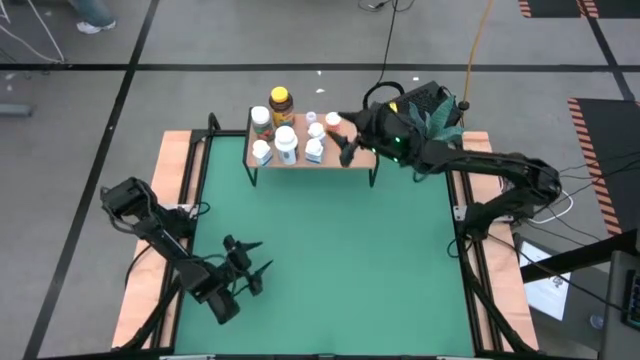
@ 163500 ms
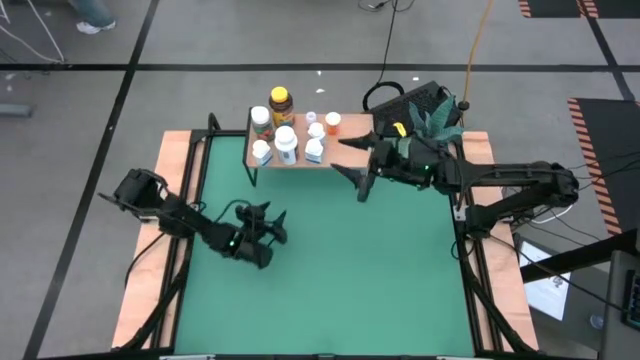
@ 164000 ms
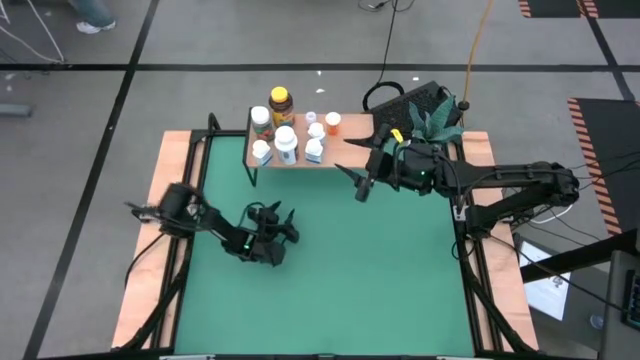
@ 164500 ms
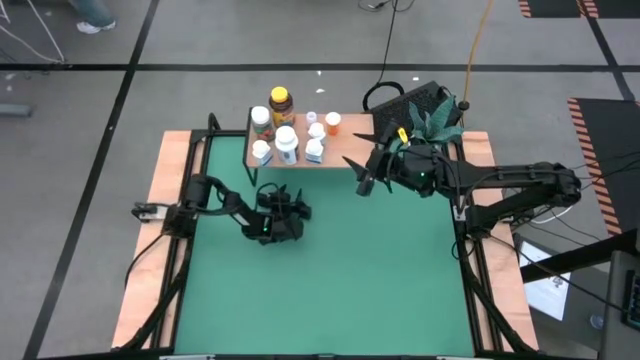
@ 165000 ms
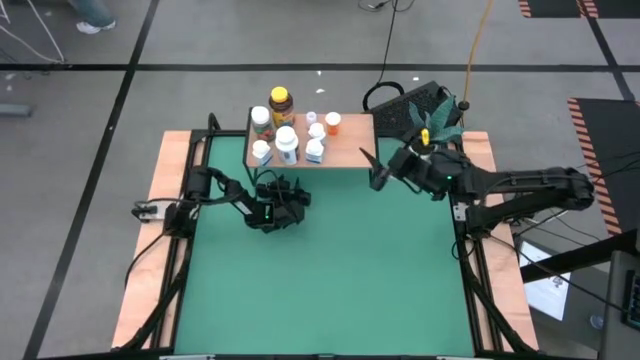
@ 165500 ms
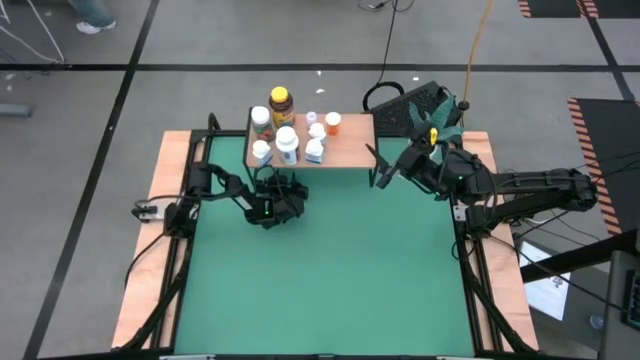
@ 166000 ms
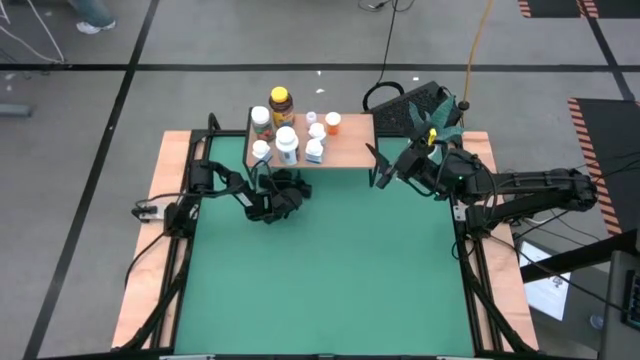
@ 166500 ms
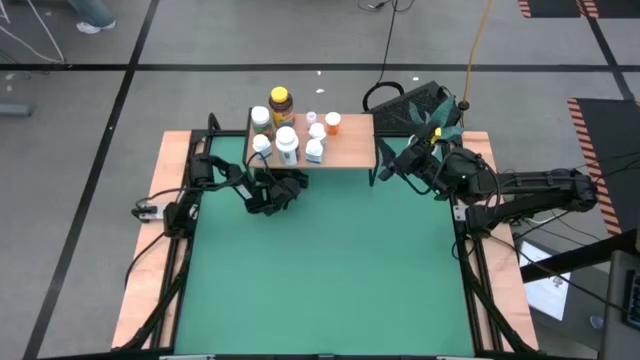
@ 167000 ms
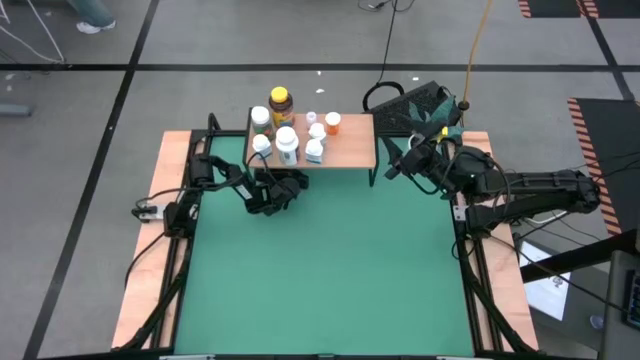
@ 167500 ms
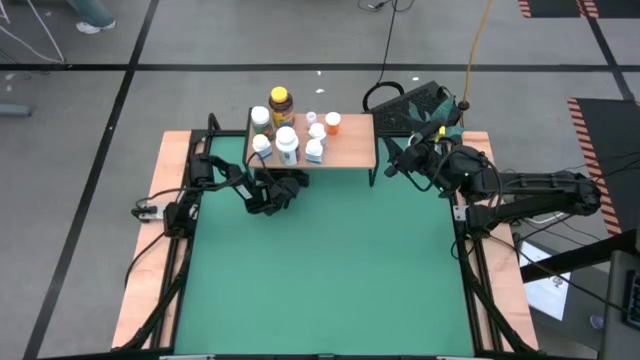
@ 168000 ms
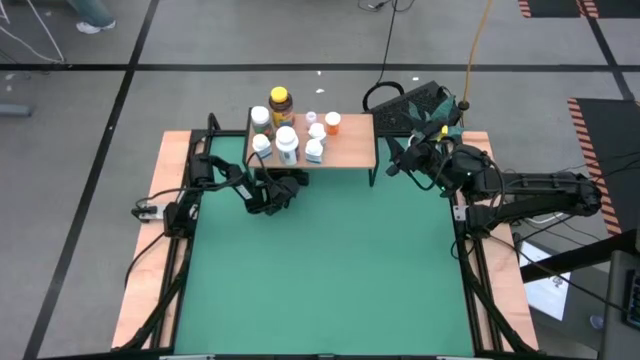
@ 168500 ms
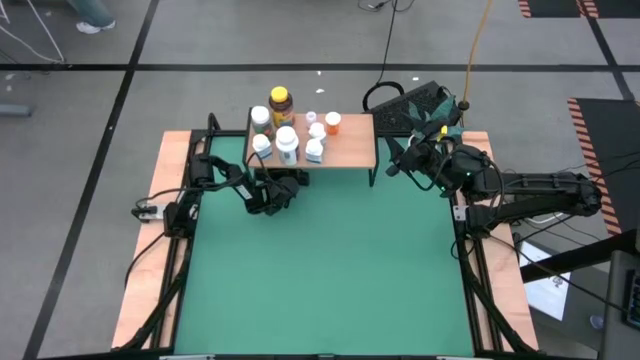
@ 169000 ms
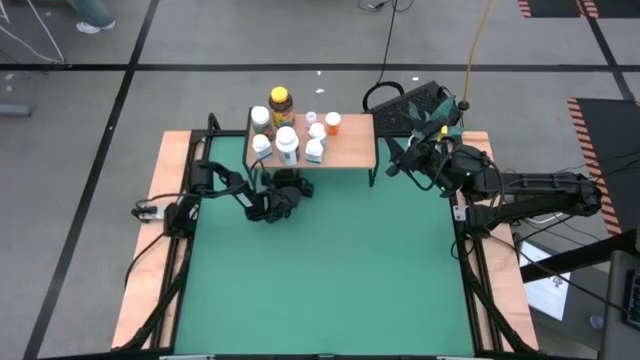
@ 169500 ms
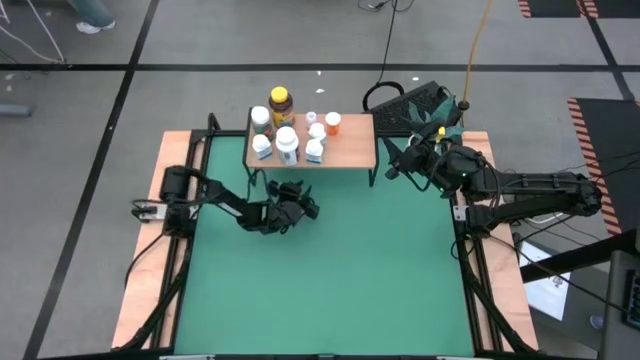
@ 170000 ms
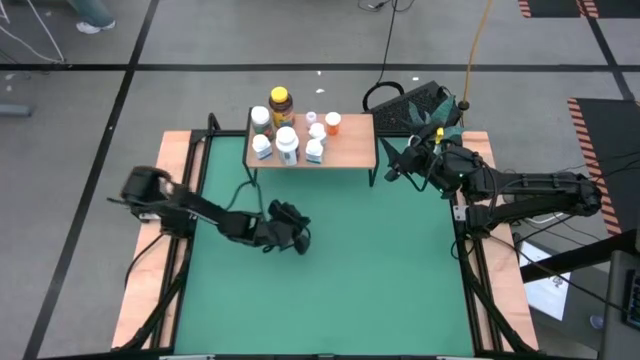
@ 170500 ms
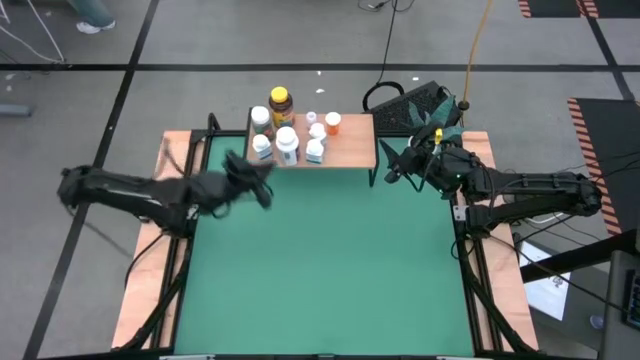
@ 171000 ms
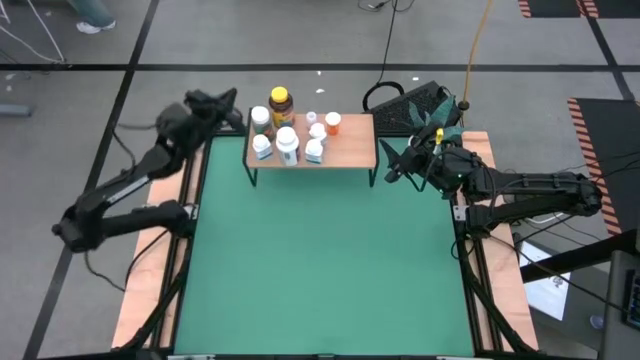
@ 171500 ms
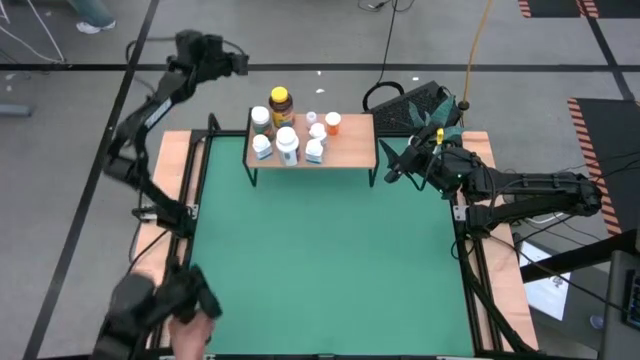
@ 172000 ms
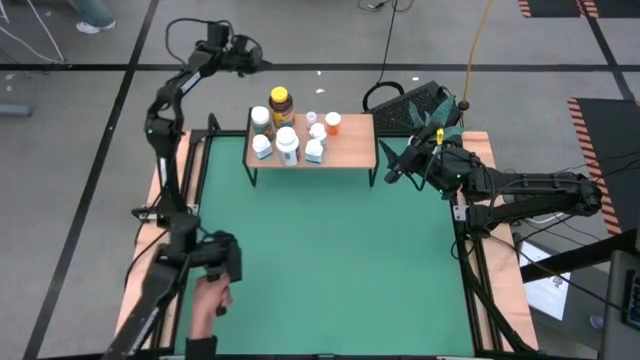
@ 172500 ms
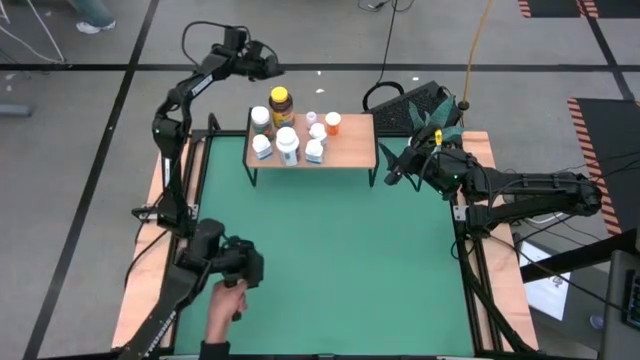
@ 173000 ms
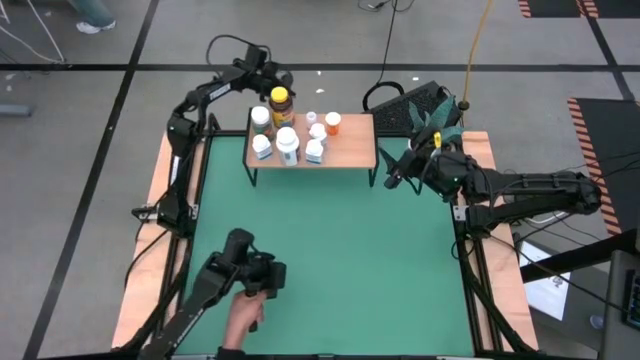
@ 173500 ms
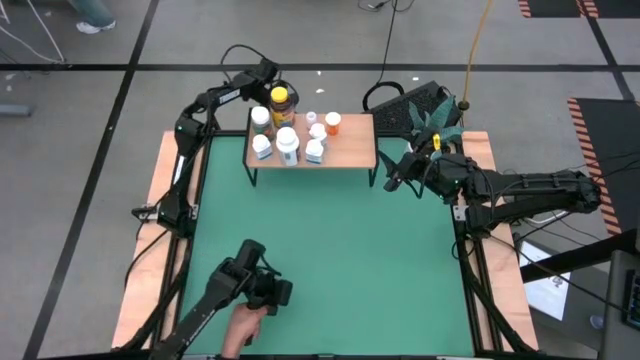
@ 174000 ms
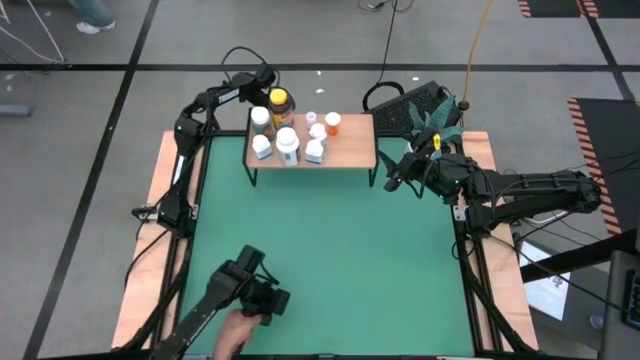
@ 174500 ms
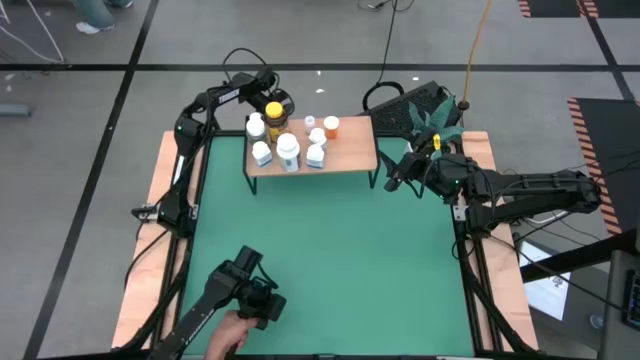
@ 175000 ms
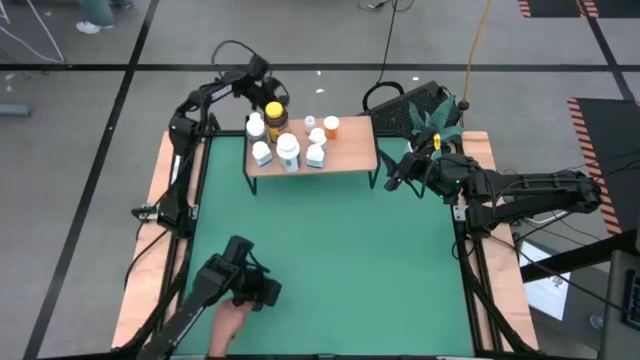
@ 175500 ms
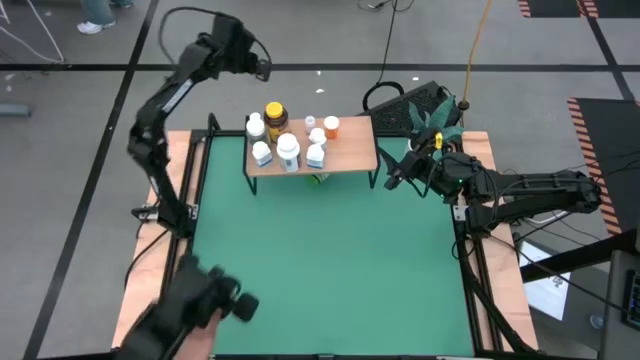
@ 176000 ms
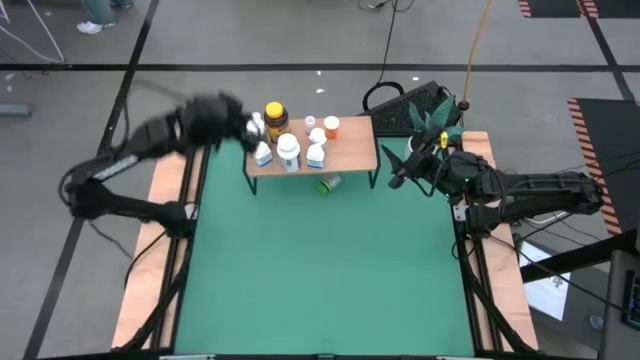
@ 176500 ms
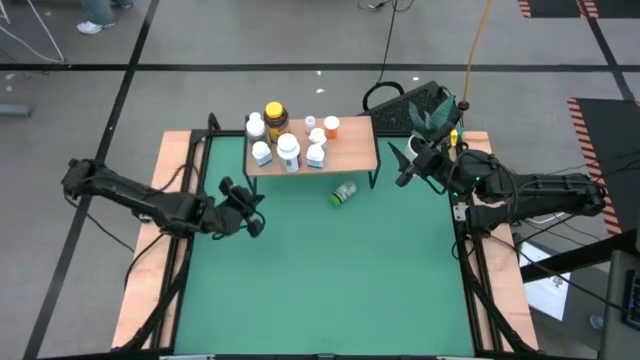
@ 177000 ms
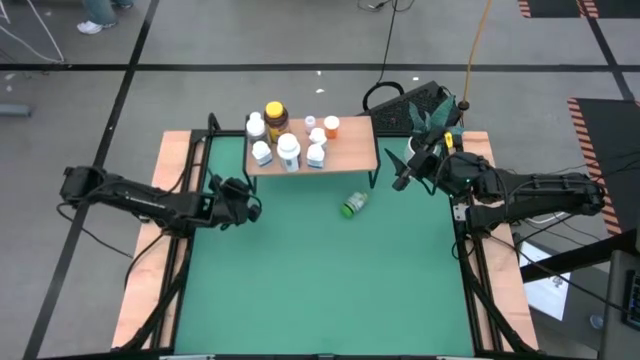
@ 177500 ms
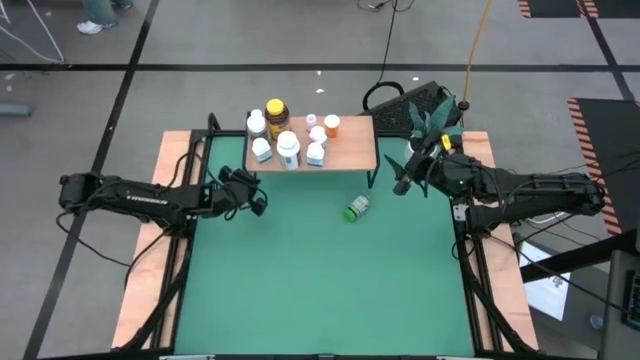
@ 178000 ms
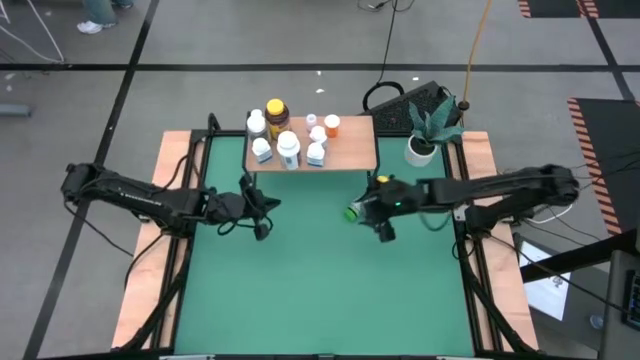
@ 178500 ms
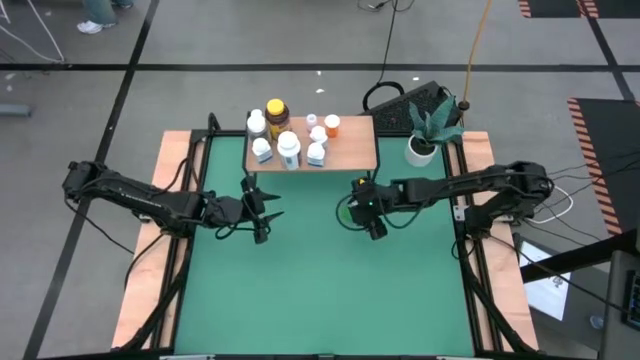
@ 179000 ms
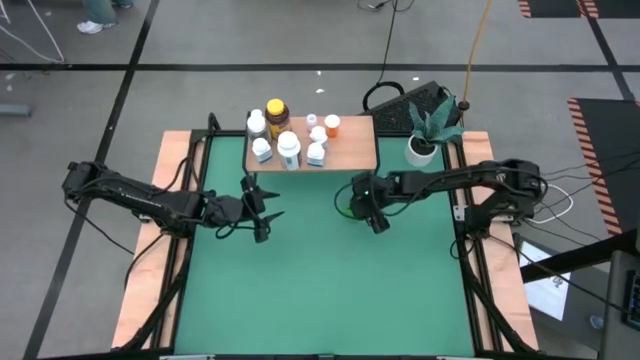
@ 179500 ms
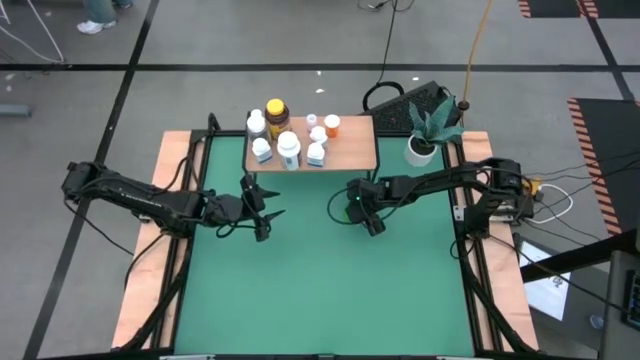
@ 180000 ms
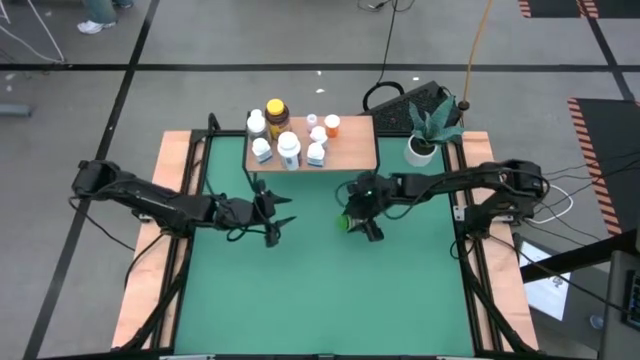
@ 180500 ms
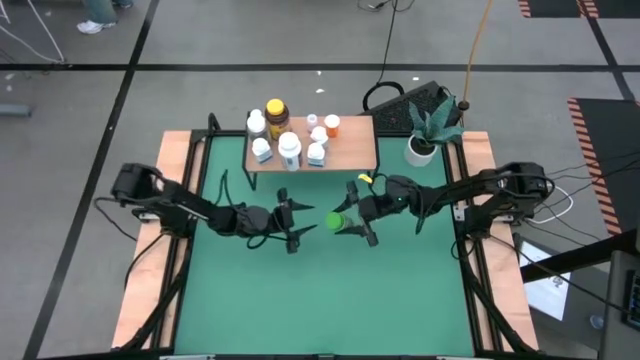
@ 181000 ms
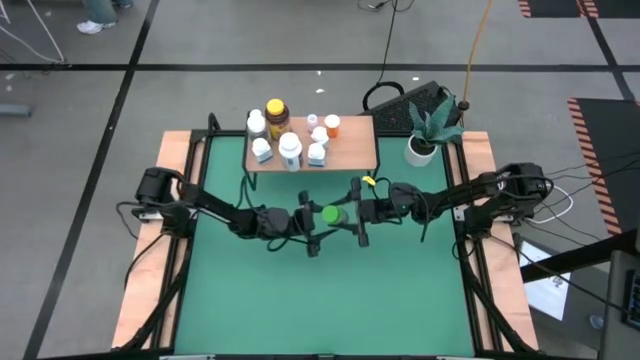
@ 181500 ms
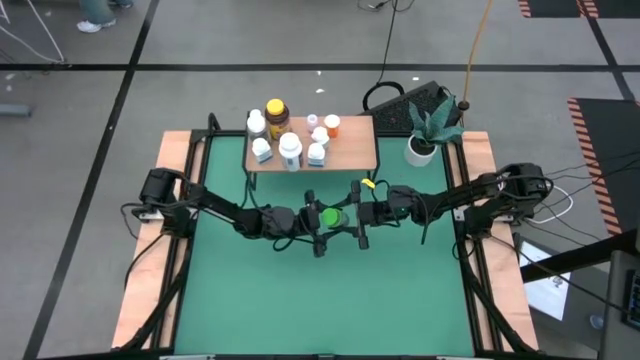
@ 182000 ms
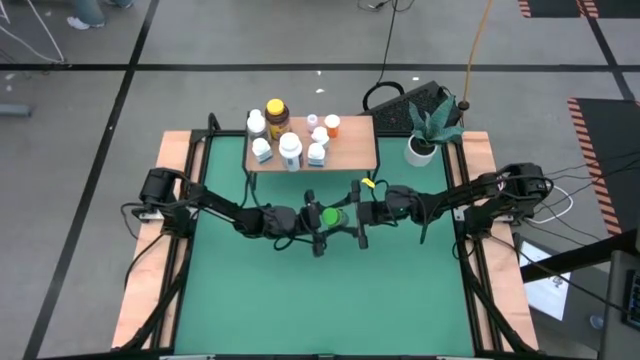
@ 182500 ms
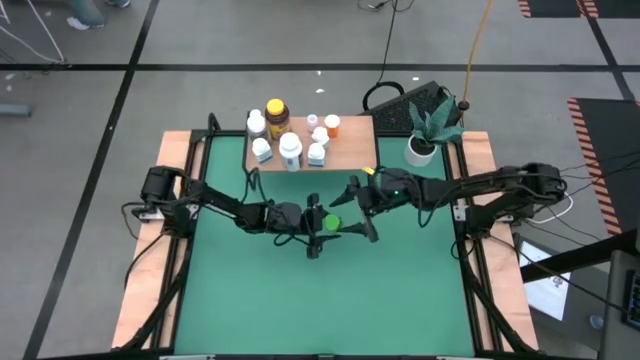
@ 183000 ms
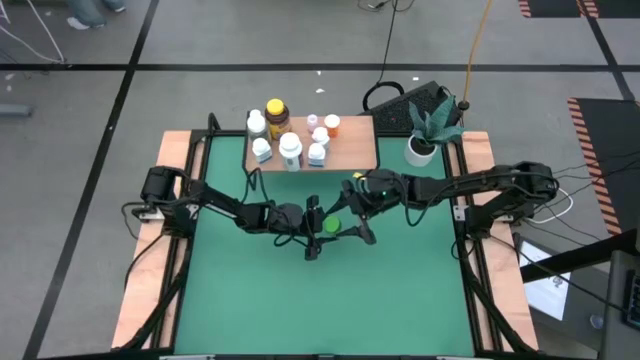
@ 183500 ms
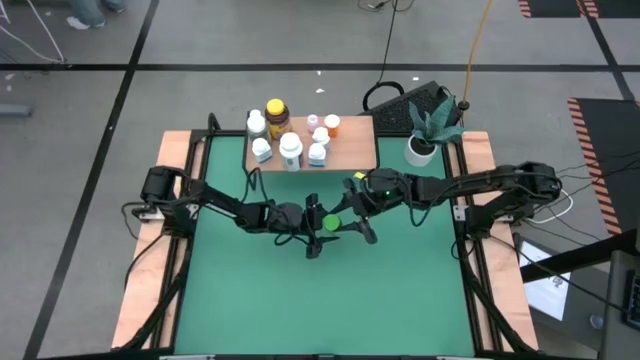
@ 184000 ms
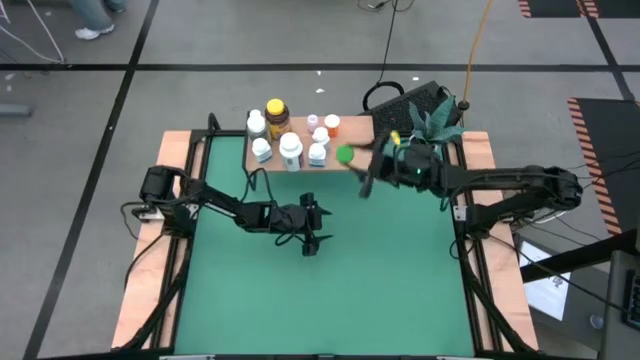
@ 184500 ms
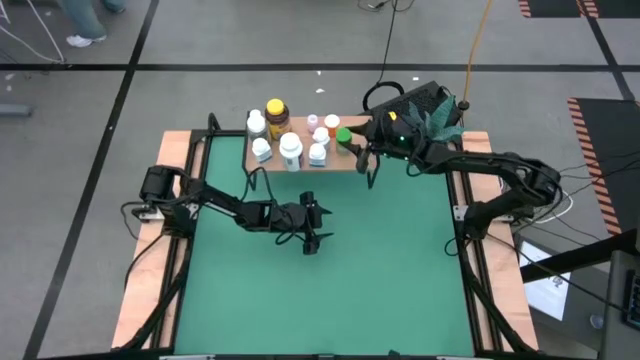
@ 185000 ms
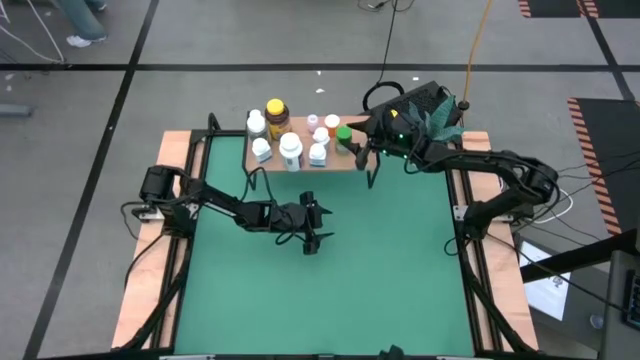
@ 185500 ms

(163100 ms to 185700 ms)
Task: Pick and place medicine bottles onto shelf by color
Put the green medicine bottle on the shelf
